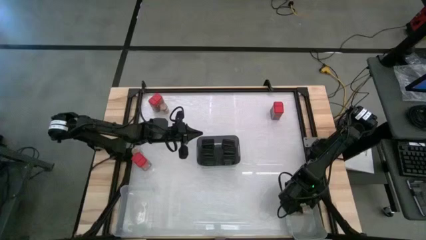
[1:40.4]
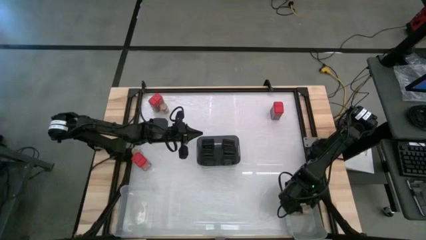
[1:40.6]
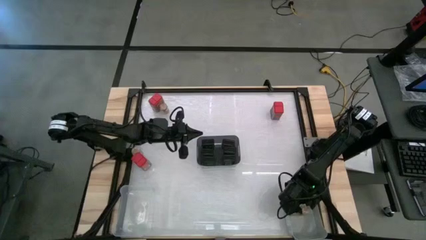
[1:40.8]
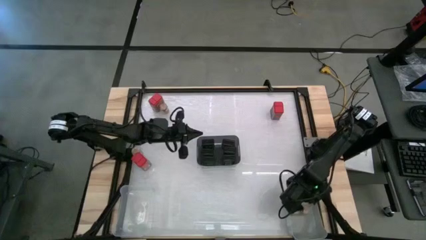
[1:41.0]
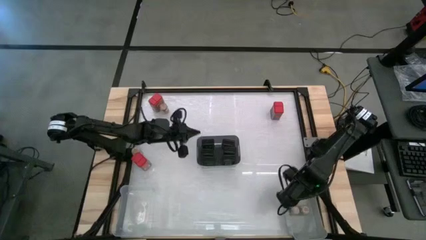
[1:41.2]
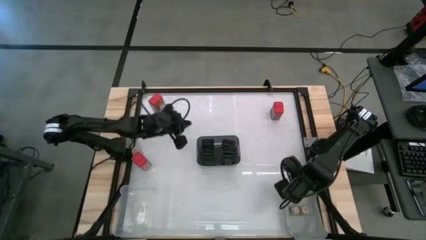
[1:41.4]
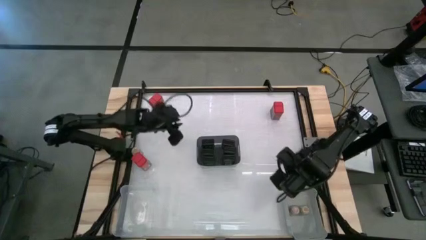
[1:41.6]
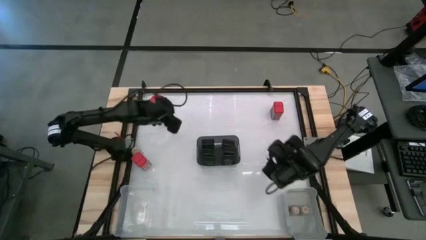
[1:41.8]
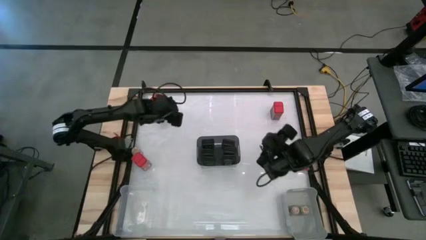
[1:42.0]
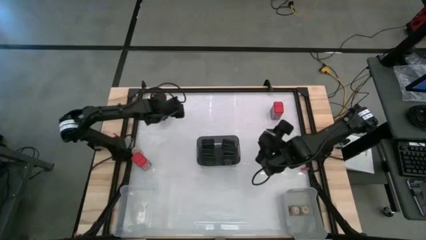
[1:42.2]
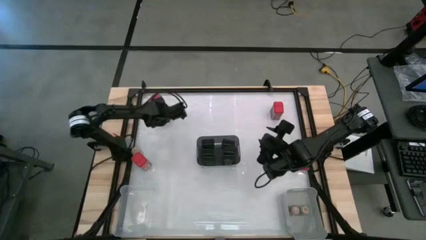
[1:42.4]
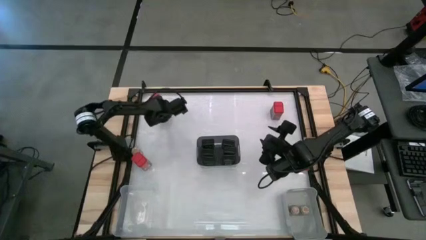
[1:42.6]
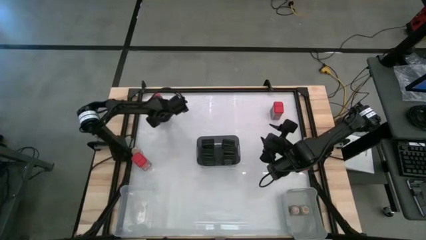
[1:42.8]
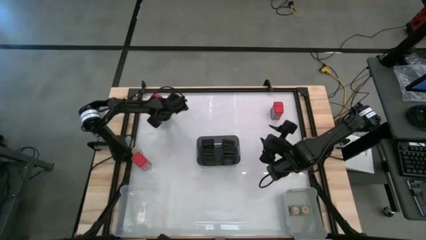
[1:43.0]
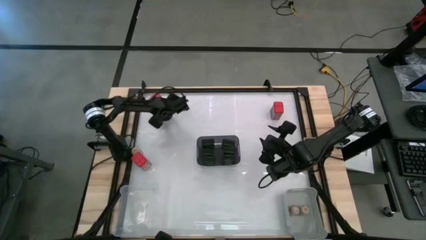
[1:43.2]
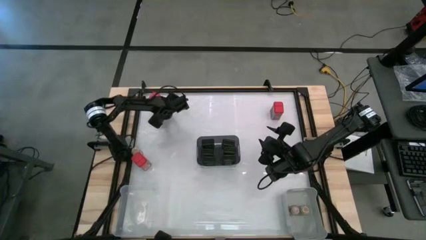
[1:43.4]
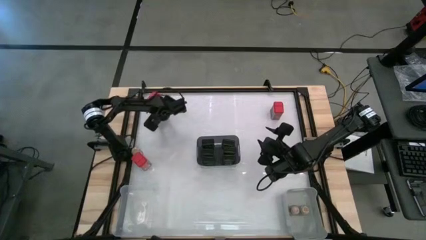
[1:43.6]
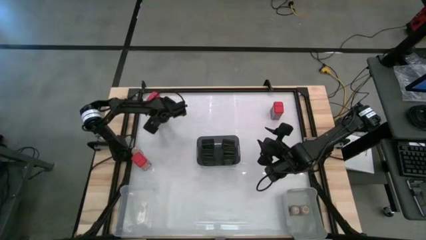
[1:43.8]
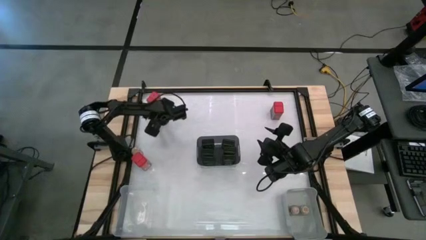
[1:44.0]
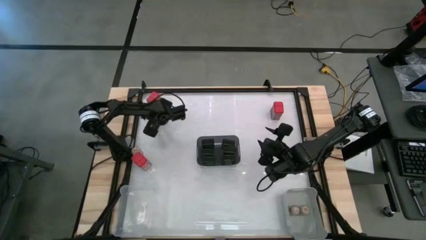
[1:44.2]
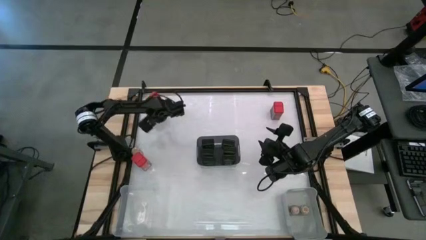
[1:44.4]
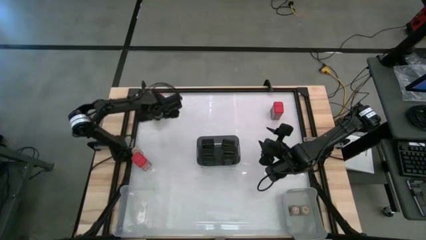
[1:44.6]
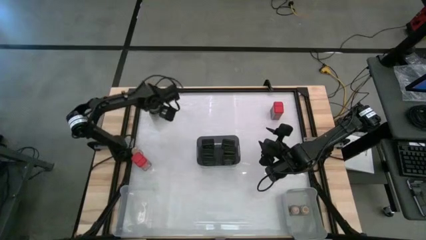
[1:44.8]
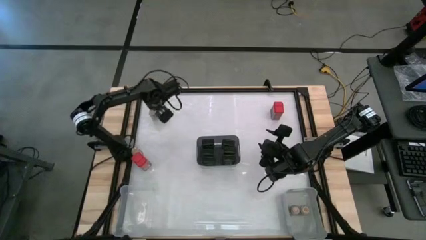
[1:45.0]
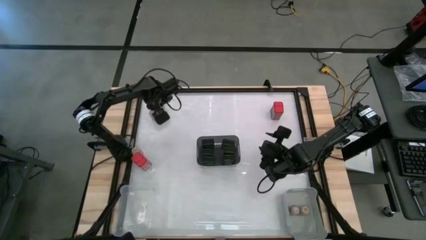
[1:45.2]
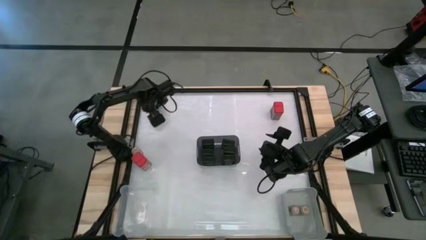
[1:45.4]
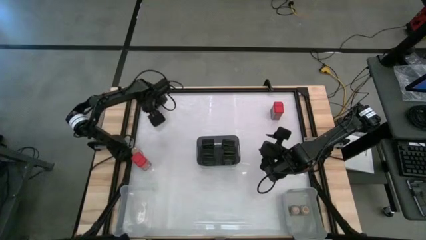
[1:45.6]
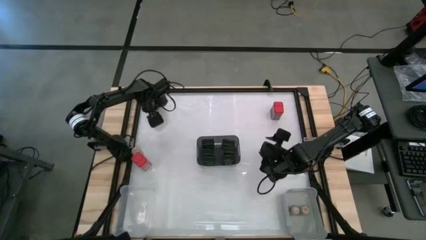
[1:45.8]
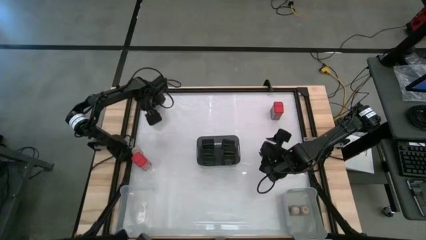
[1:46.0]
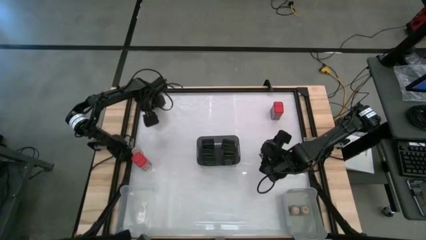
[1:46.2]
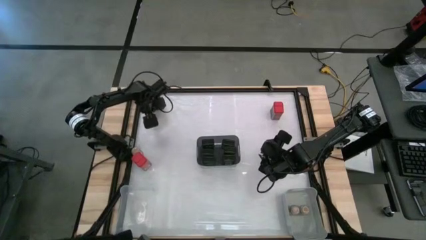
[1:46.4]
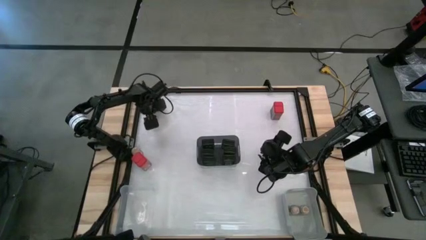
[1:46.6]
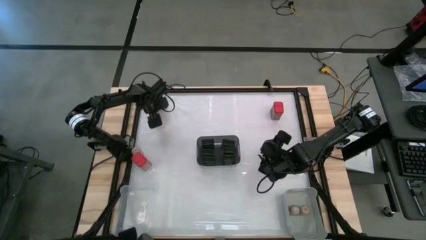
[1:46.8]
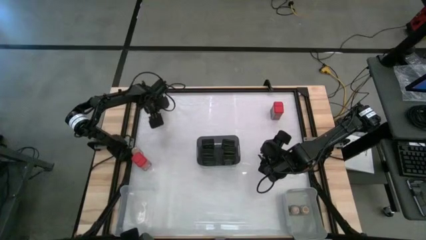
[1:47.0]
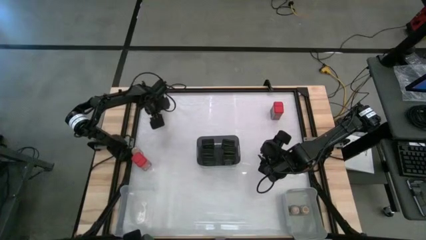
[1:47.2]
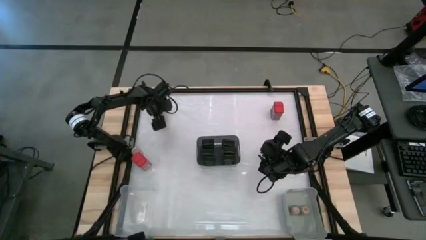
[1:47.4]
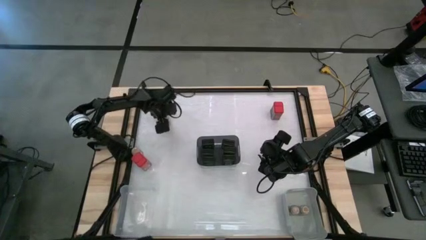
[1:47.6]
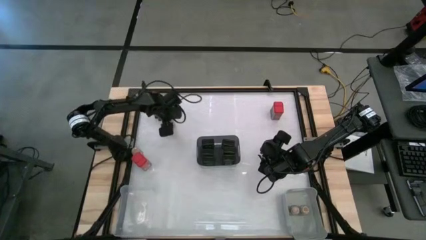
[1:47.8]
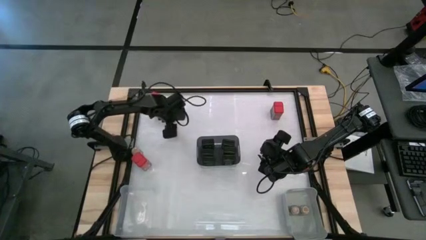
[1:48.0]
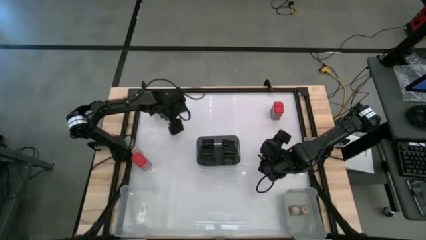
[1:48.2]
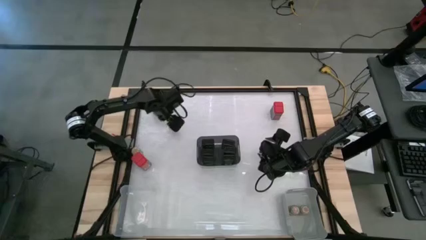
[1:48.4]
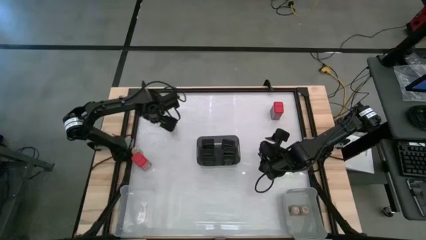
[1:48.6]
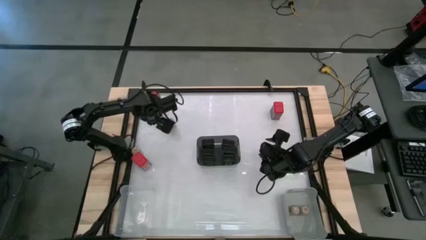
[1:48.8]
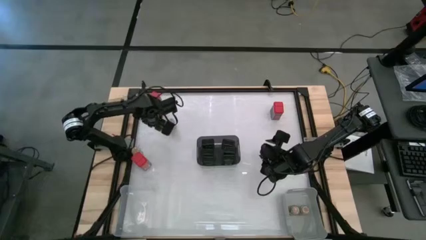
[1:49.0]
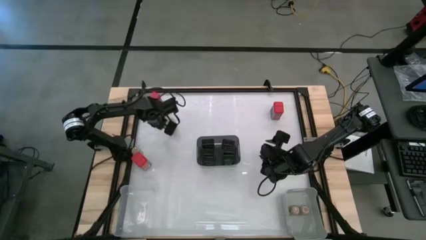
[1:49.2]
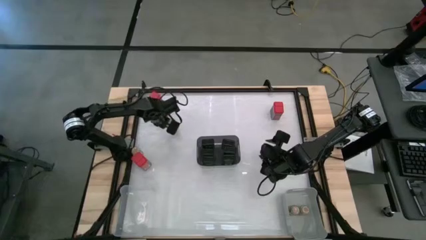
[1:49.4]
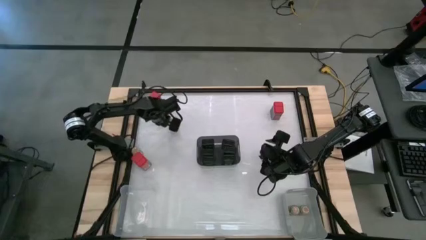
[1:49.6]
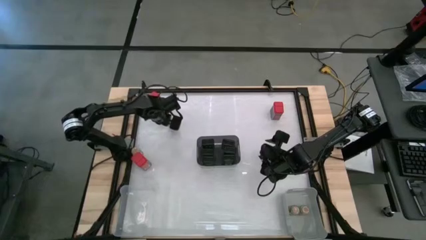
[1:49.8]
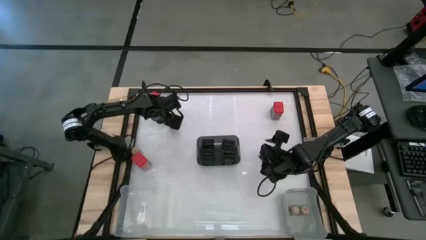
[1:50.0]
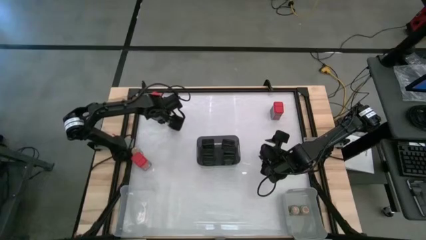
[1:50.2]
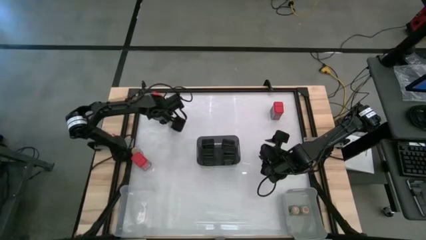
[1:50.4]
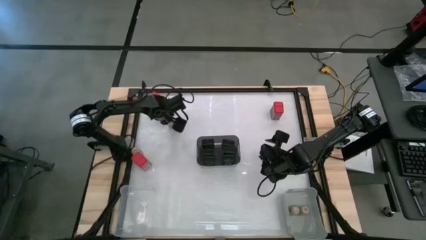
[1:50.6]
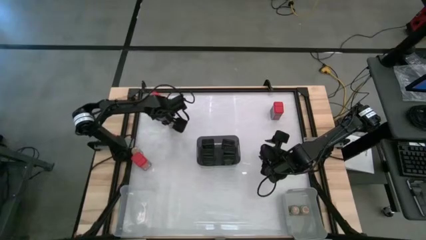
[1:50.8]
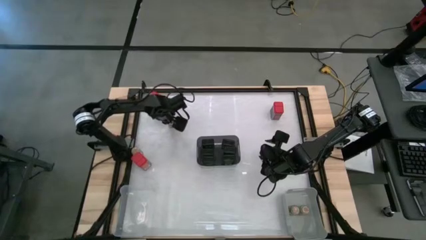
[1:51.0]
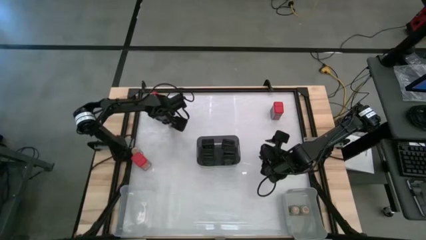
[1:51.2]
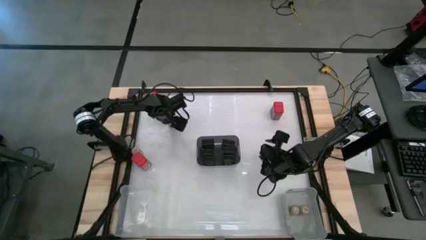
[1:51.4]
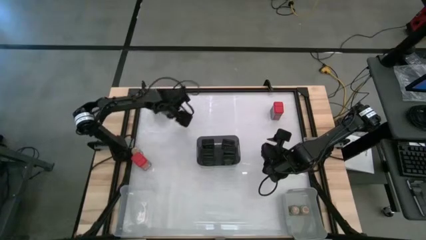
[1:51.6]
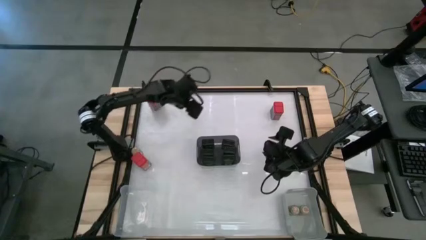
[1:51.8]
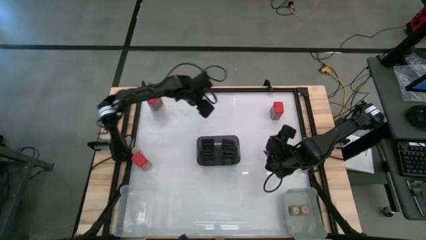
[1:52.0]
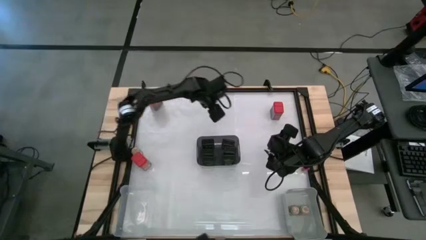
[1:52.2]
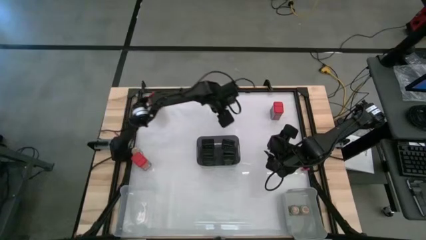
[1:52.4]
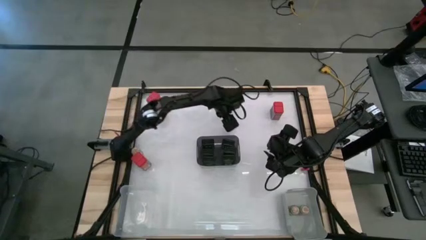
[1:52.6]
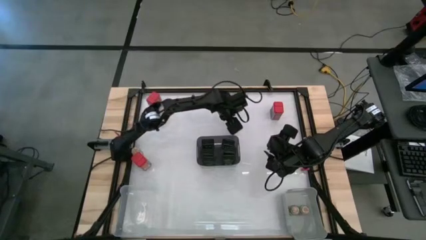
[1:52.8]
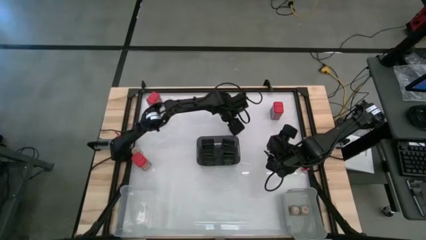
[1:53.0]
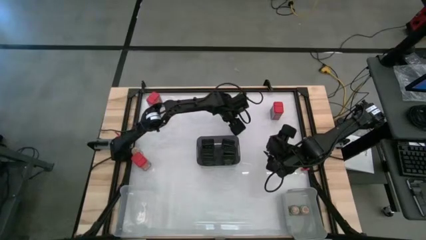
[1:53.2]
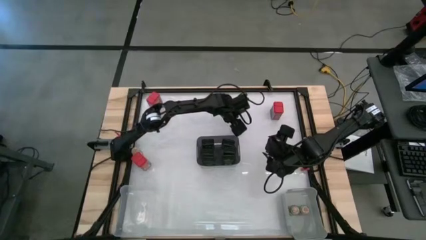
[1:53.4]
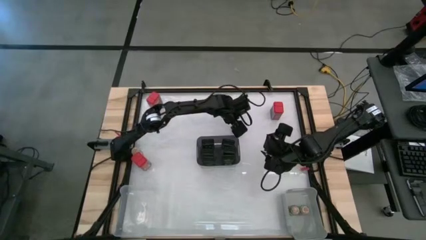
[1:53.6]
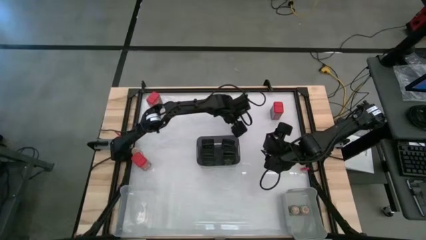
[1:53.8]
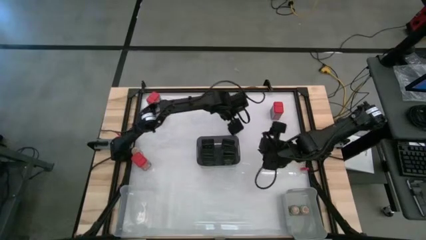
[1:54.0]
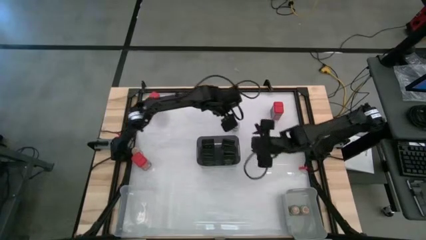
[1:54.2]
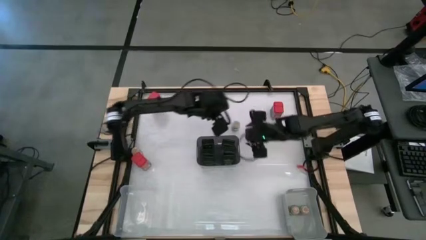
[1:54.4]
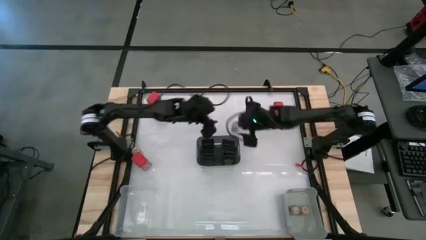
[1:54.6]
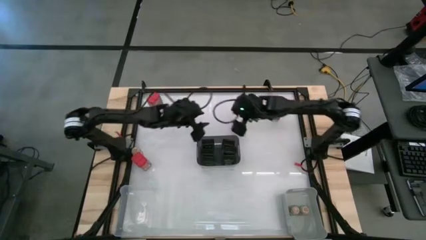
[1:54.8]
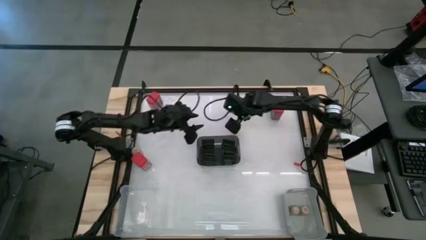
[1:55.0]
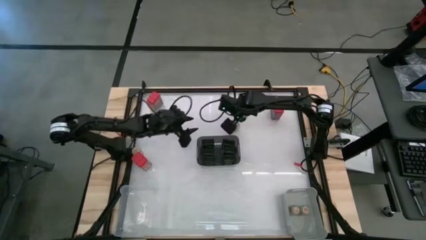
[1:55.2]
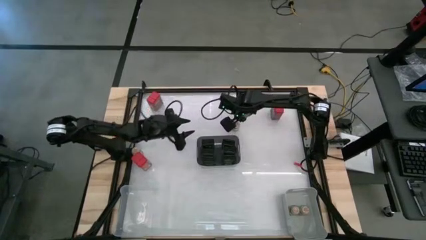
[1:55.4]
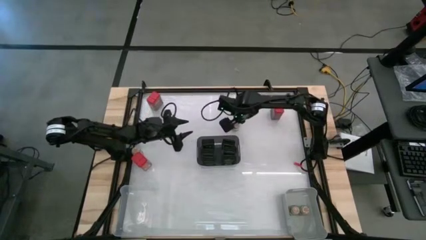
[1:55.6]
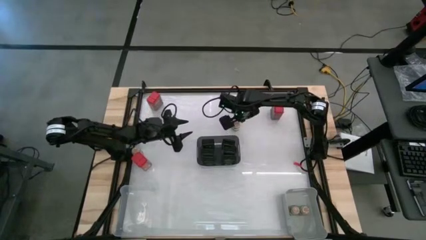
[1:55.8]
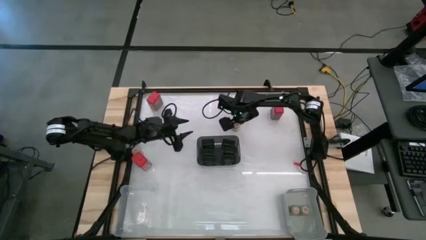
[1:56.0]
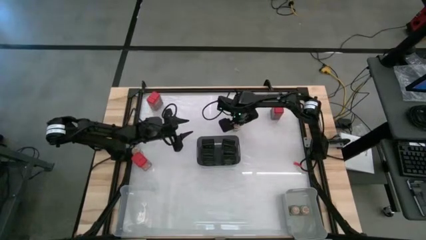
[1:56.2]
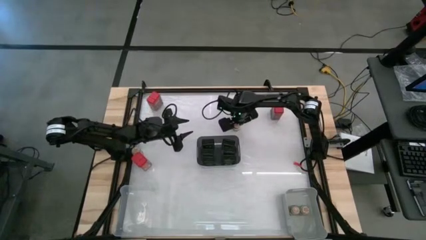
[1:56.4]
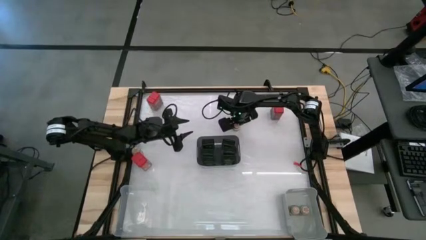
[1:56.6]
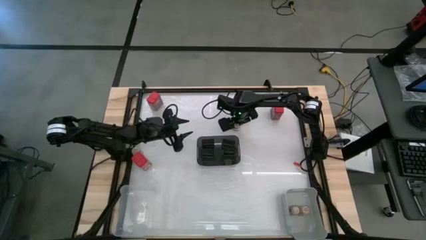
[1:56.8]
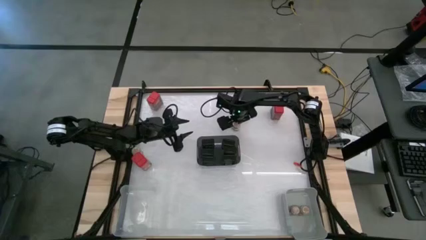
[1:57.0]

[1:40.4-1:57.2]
Task: Sort spices by type
Put the brown seasoning bottle into the gray bin

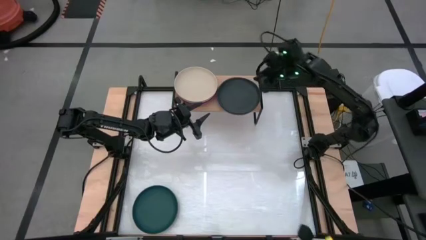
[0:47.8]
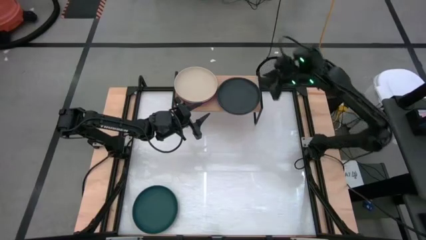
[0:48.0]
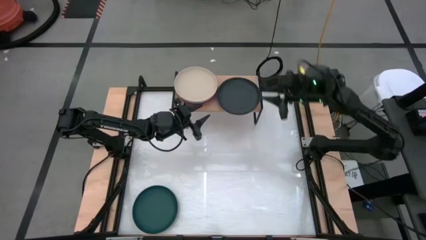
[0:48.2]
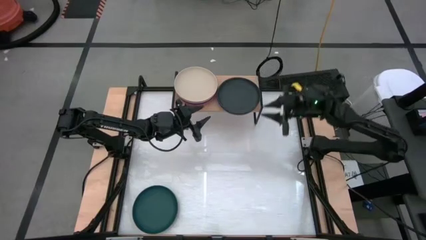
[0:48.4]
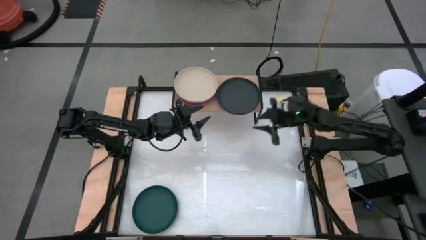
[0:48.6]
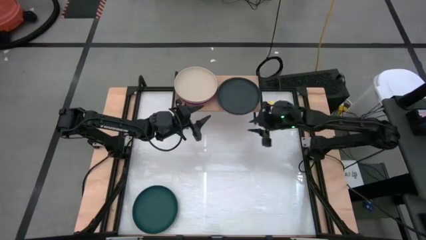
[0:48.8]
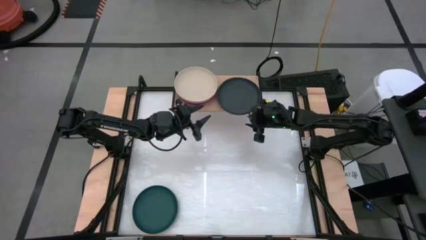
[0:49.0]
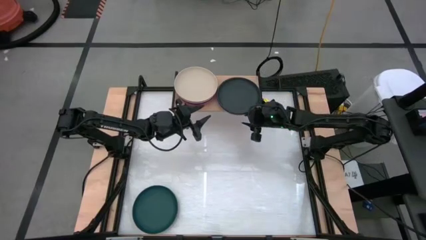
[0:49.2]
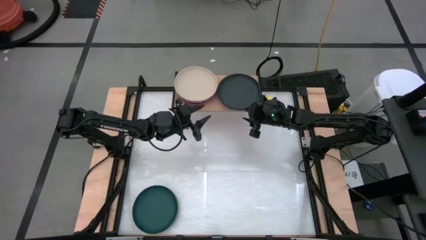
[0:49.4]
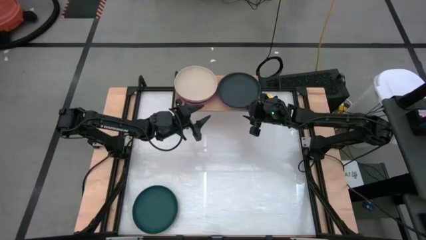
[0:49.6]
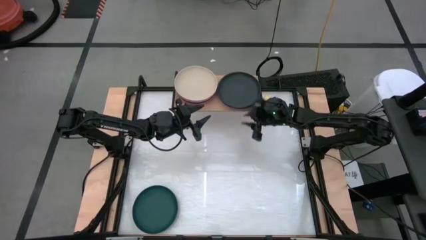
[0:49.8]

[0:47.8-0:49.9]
Task: Place and stack plates onto a shelf
Adjust the plates
